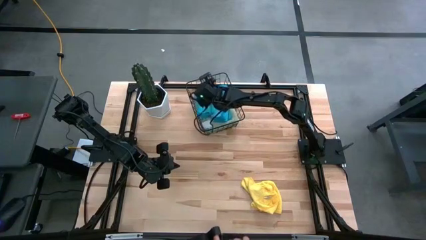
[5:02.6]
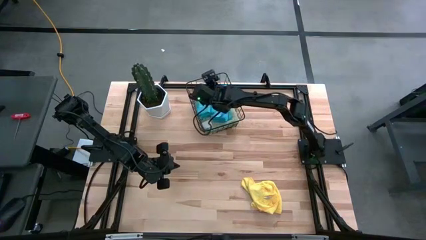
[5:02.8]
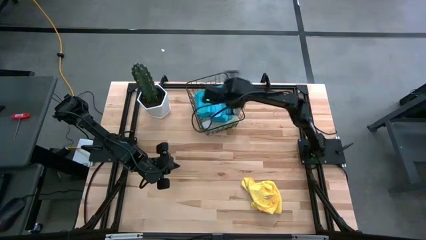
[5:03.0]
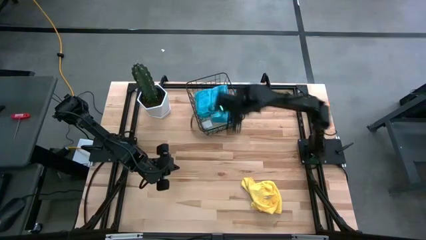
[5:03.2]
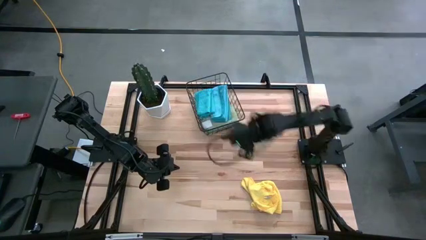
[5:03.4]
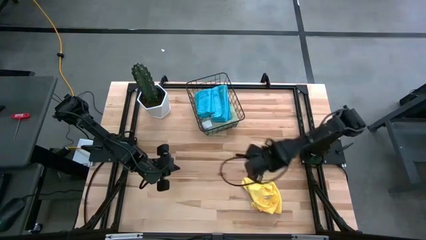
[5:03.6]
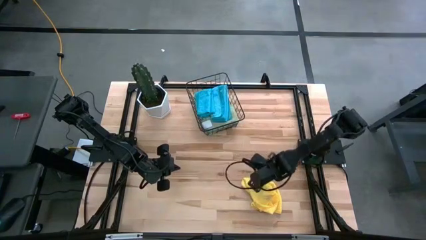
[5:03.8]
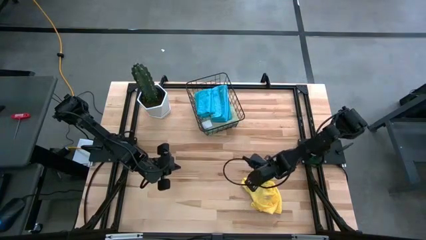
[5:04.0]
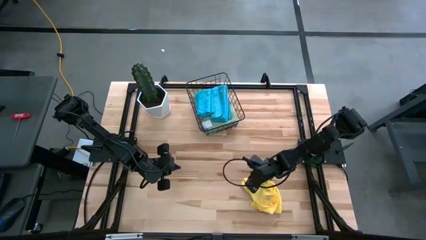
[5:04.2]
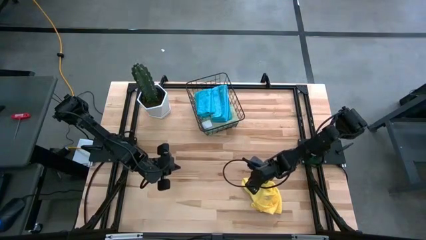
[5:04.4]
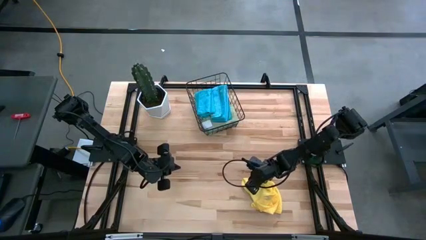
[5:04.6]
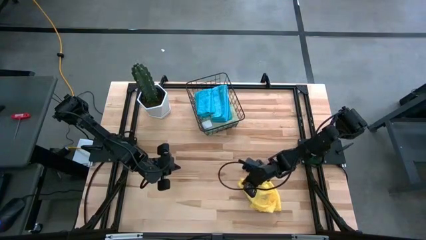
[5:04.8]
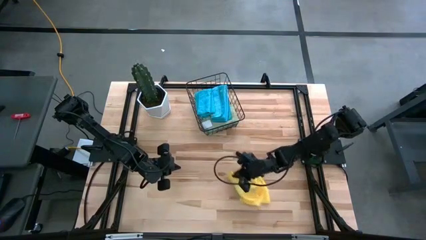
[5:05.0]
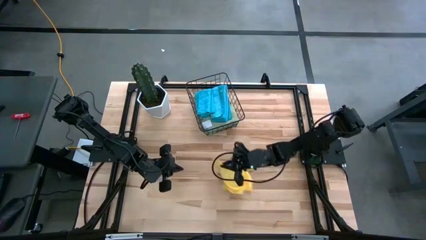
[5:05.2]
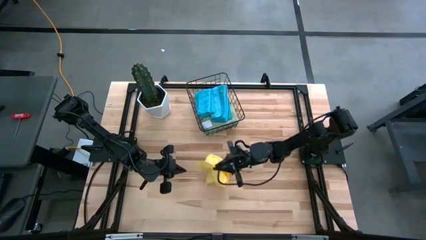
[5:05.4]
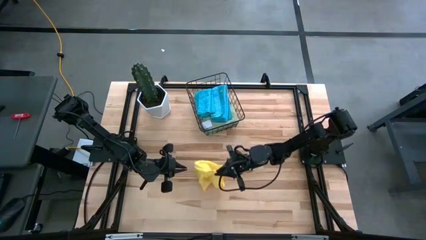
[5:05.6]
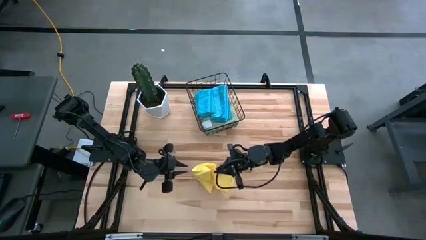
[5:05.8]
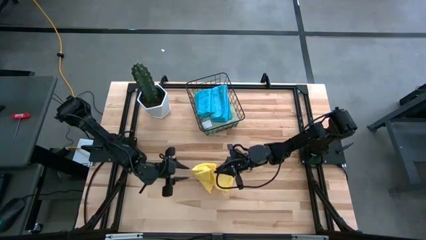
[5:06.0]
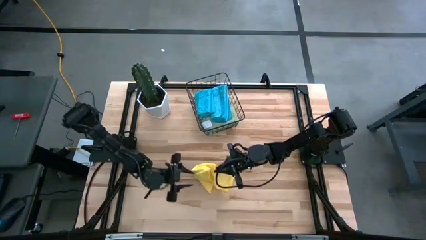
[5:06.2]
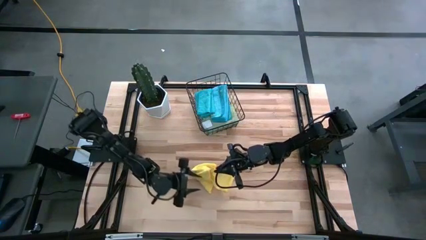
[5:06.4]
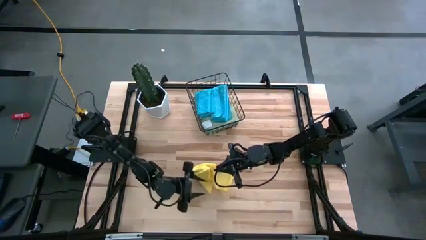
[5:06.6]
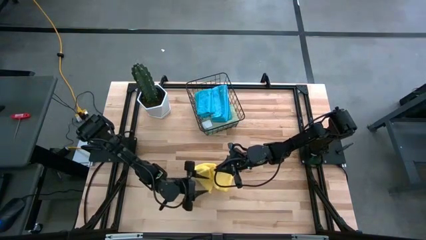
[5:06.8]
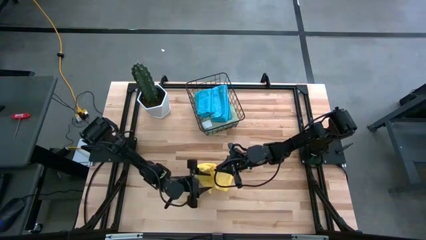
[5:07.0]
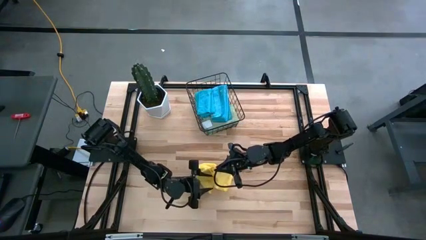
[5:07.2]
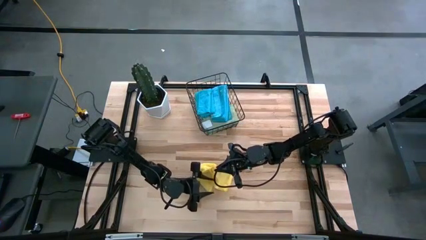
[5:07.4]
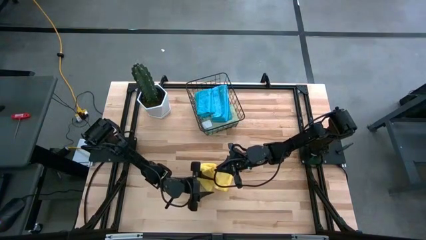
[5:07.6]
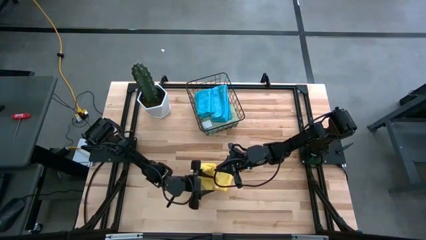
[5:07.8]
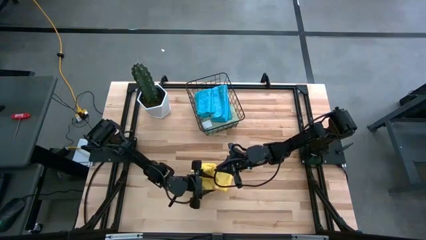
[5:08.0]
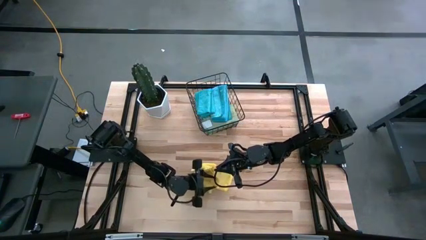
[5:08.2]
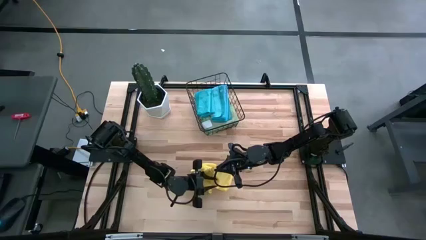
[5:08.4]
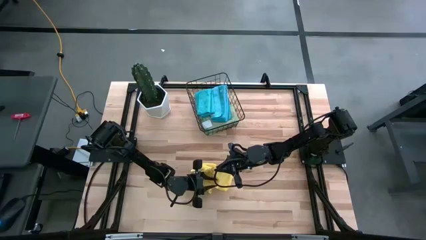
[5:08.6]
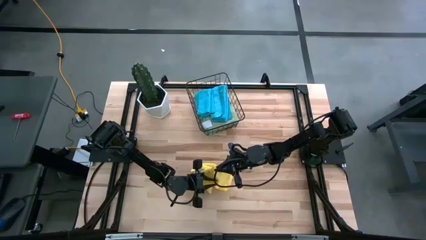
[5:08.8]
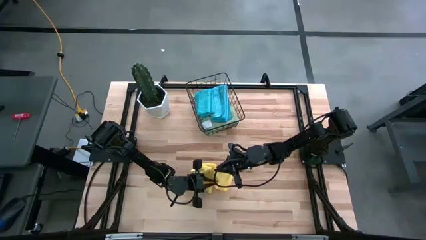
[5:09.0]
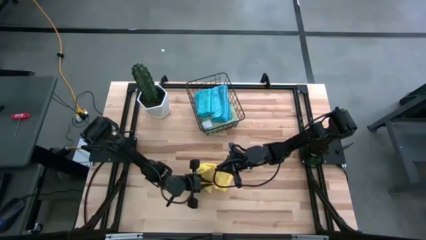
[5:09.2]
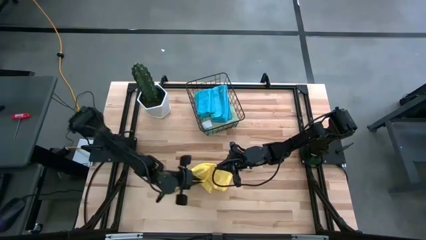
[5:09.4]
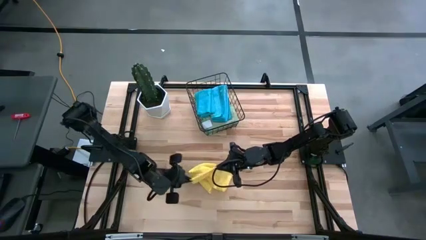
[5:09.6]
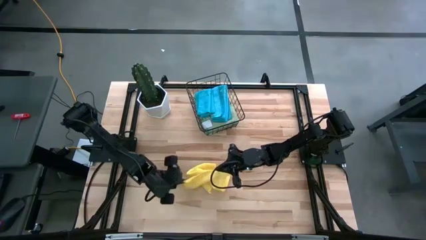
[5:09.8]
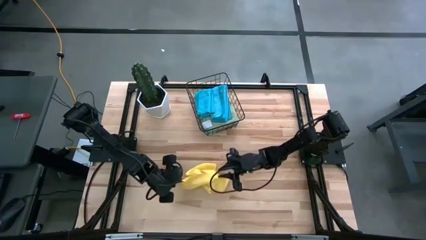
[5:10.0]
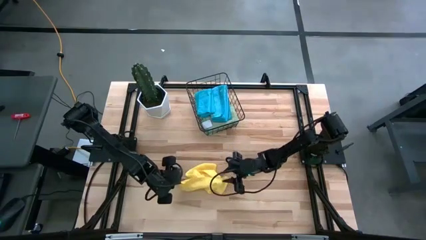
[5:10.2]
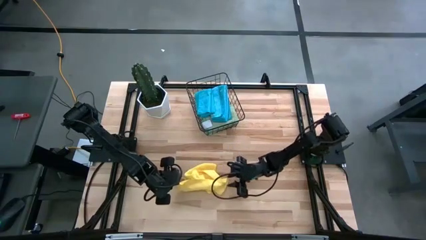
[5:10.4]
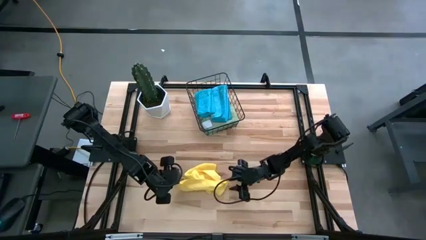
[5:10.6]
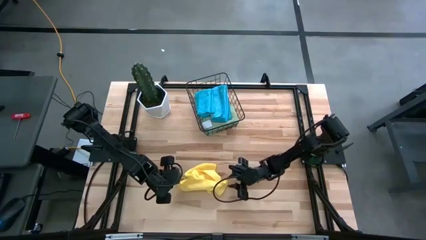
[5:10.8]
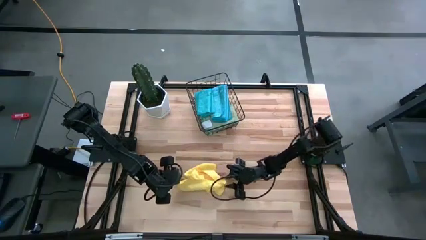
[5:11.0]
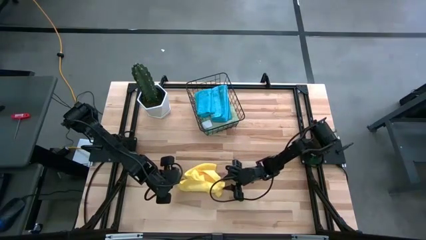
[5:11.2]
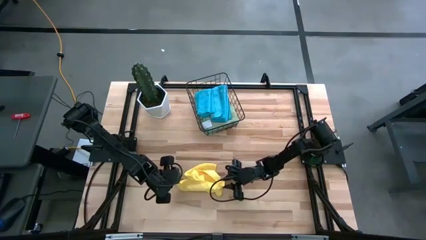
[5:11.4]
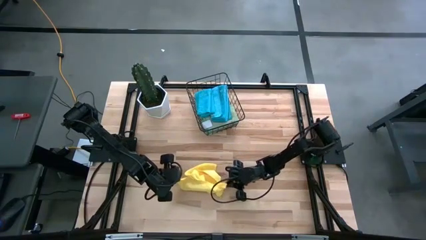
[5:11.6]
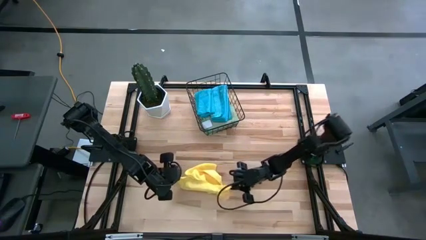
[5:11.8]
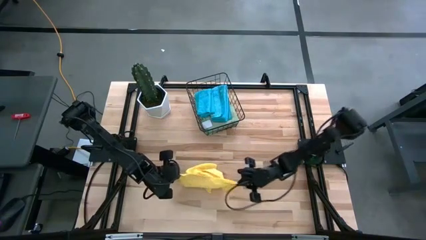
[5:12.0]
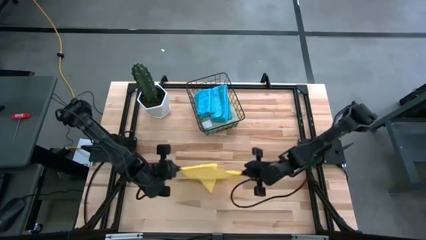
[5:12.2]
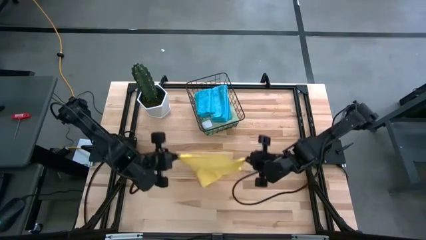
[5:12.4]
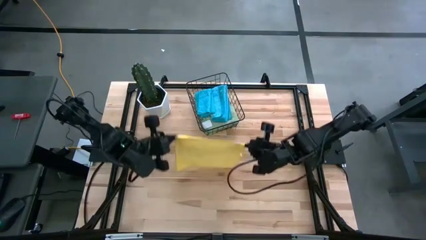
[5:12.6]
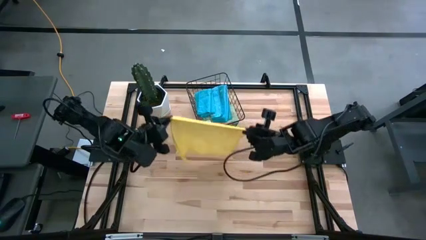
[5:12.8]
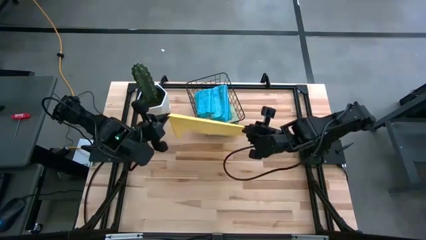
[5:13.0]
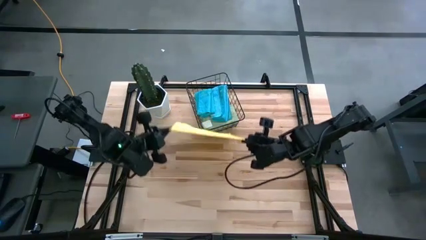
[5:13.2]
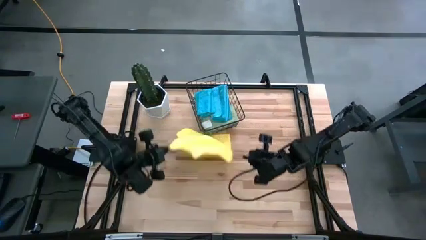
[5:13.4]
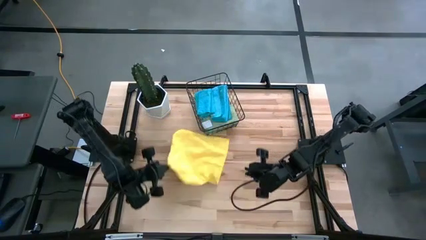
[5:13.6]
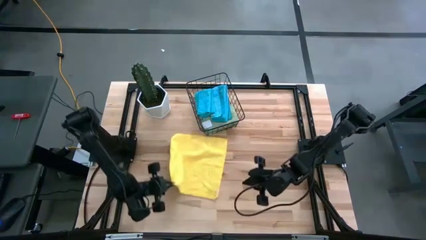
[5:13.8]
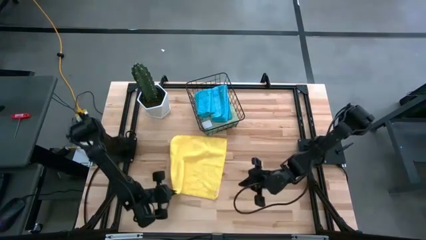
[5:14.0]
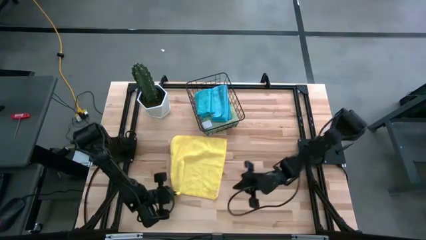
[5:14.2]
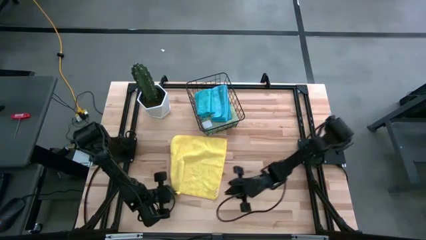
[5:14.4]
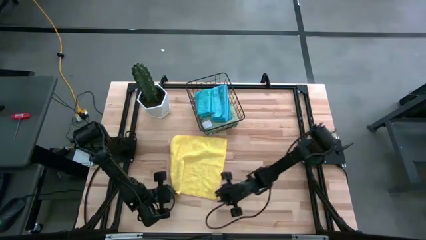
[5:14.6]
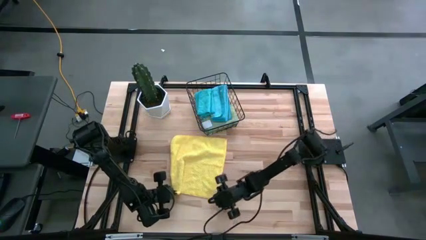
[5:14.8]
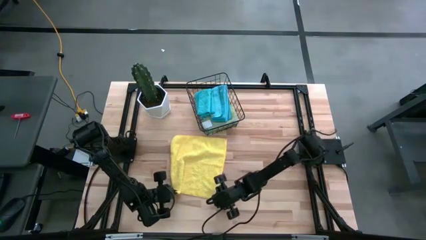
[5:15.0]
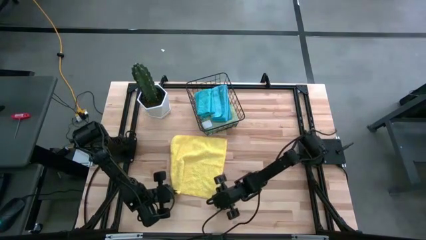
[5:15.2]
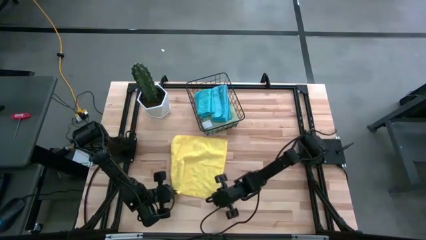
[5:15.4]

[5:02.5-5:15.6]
Task: Fold microfiber towels
Fold the yellow microfiber cloth

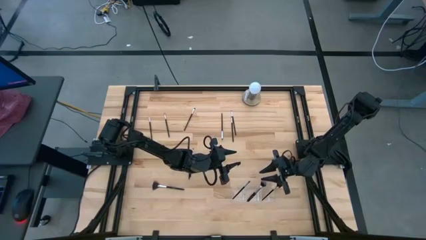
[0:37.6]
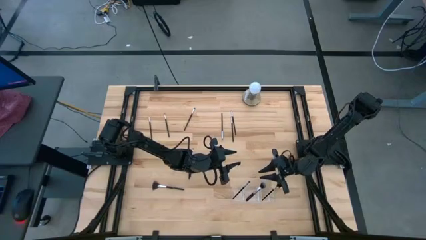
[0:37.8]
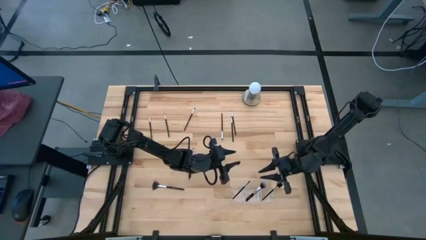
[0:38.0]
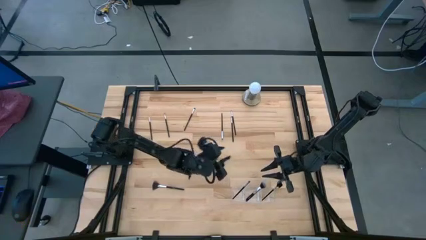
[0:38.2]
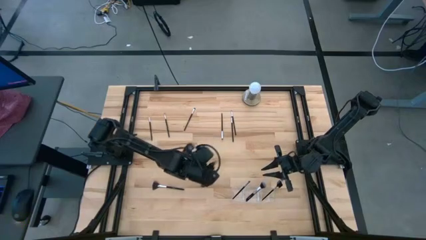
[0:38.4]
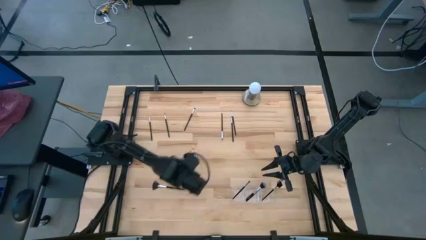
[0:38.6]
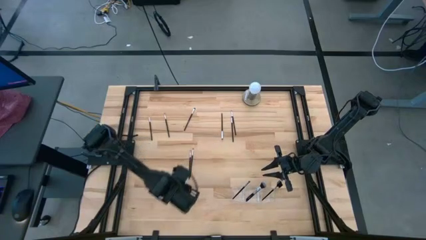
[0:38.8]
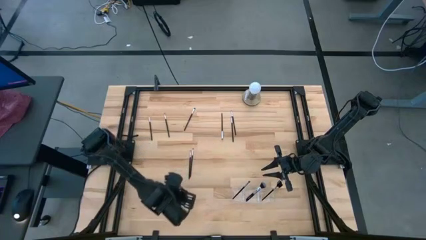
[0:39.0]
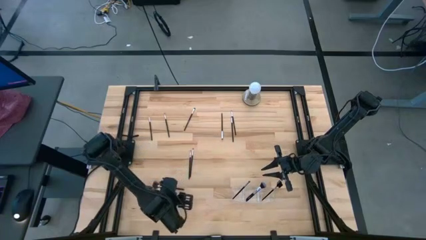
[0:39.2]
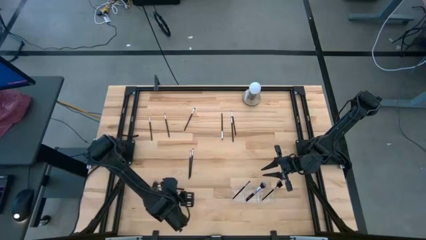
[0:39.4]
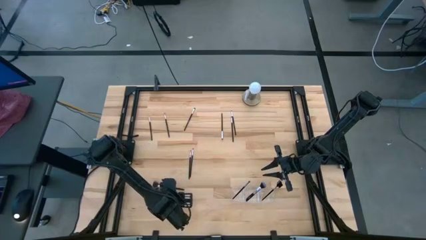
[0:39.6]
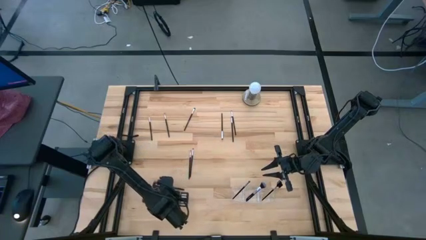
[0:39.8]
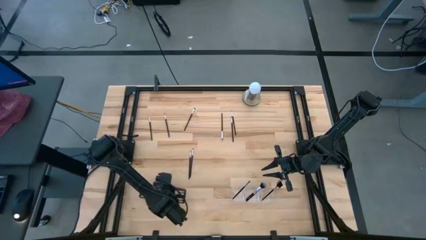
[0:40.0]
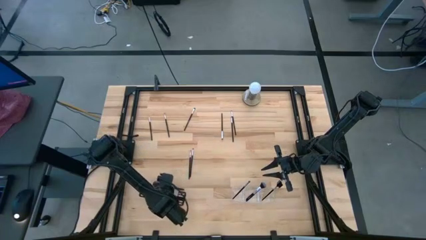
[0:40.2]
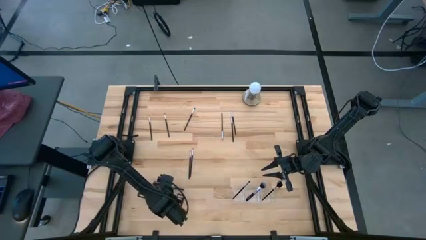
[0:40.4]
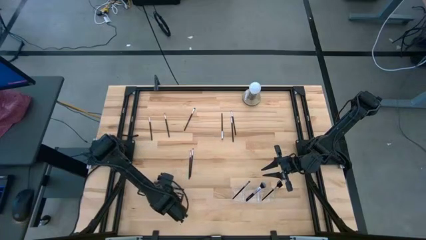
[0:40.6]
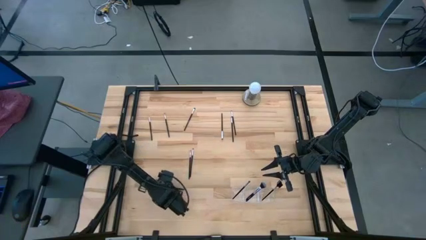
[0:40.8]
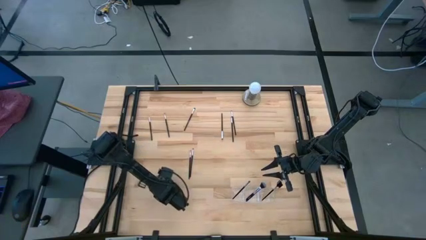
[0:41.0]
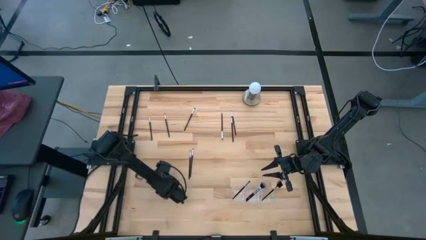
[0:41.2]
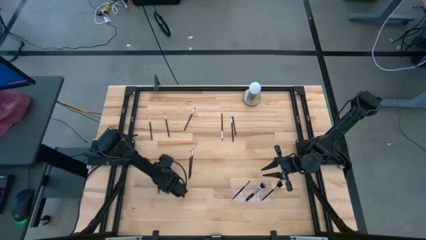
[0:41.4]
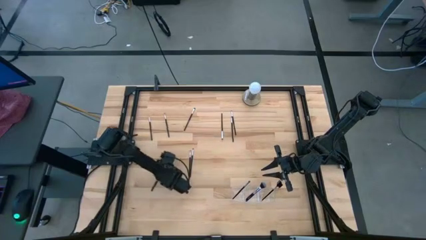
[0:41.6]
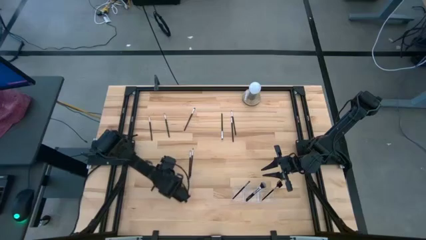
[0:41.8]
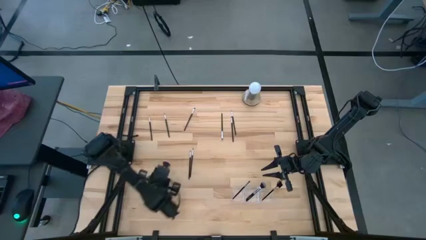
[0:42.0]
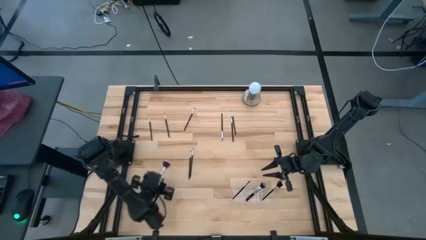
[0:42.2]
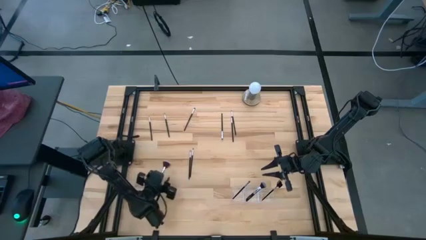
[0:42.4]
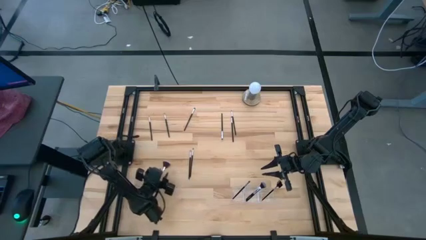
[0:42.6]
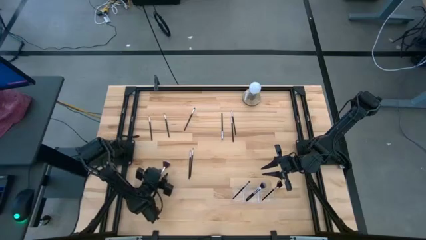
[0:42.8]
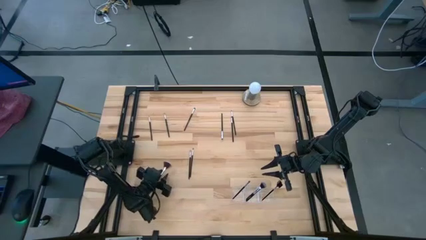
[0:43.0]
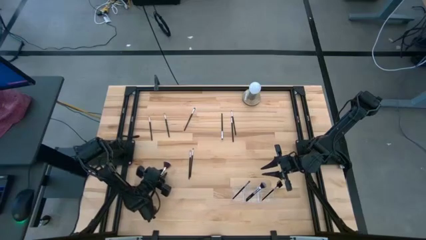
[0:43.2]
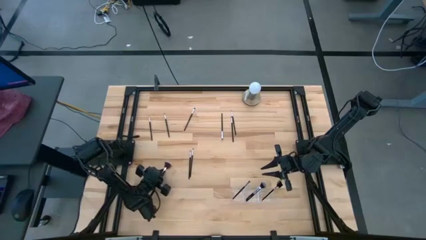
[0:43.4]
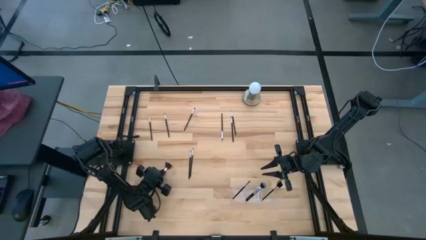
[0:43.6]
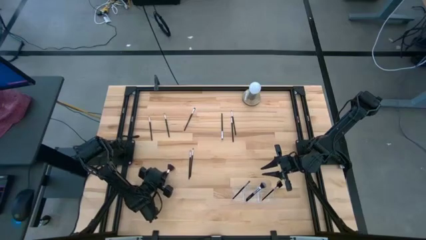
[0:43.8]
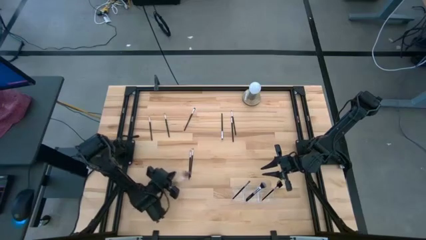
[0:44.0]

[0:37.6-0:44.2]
Task: Put items in baskets/containers
Put the highlighter brush into the left section of the transparent organizer
